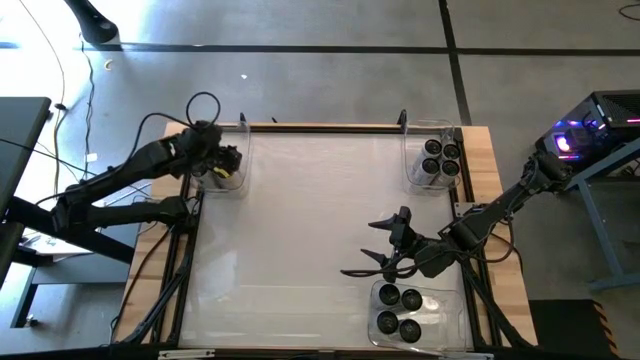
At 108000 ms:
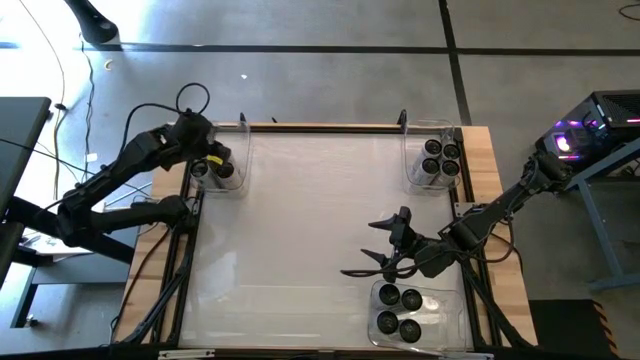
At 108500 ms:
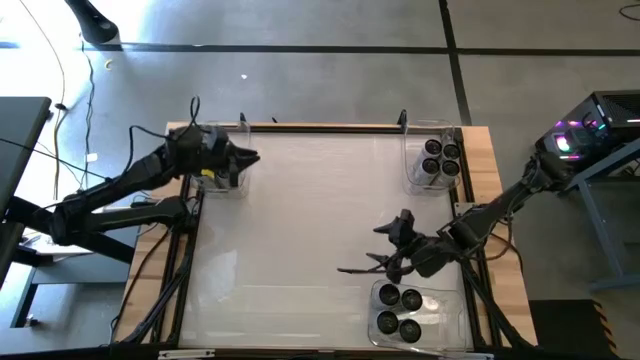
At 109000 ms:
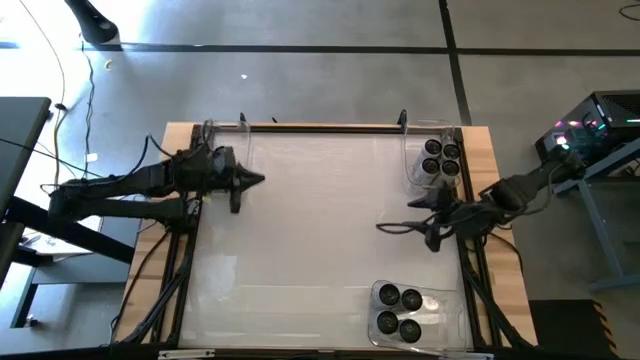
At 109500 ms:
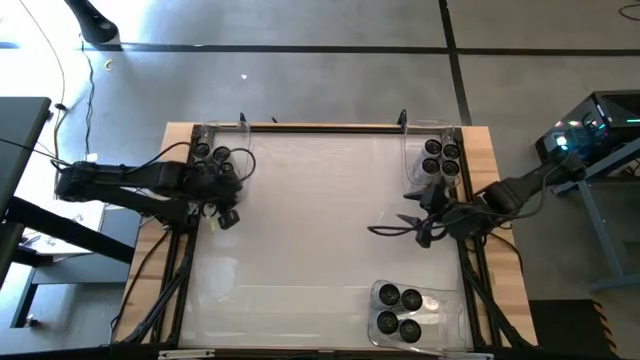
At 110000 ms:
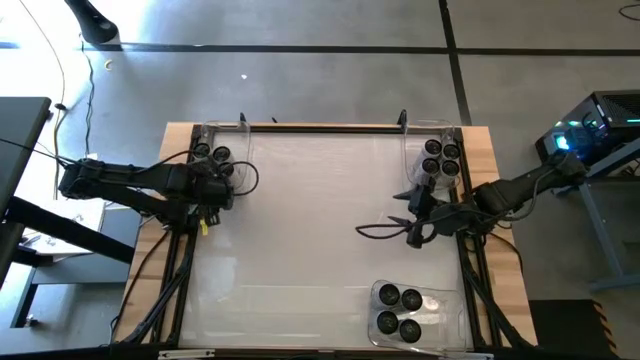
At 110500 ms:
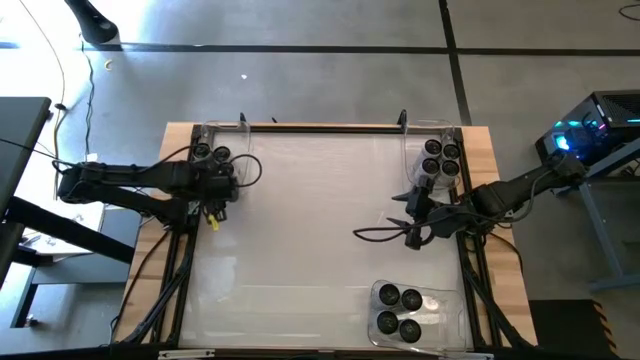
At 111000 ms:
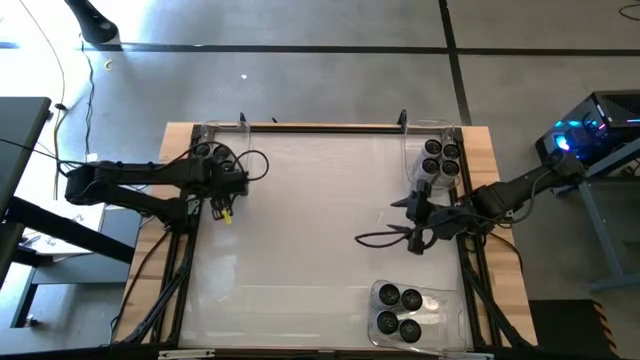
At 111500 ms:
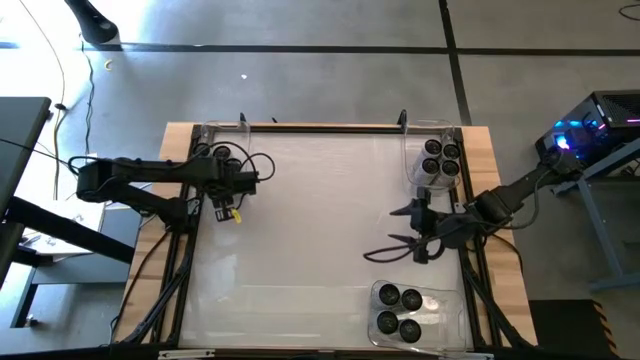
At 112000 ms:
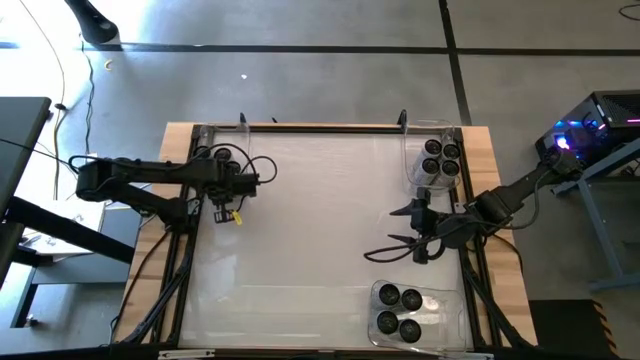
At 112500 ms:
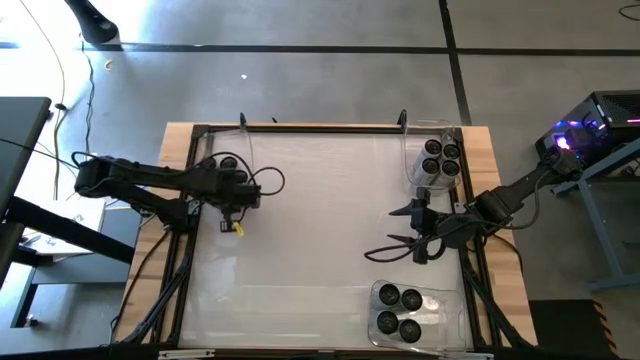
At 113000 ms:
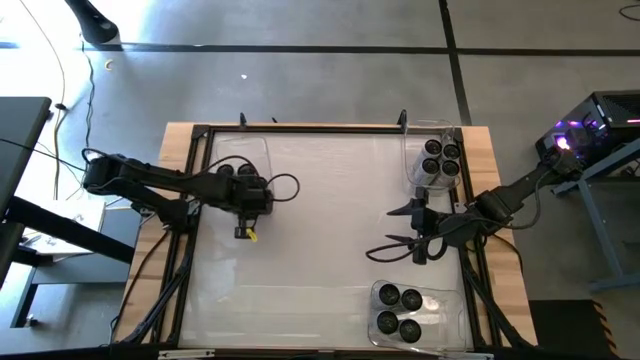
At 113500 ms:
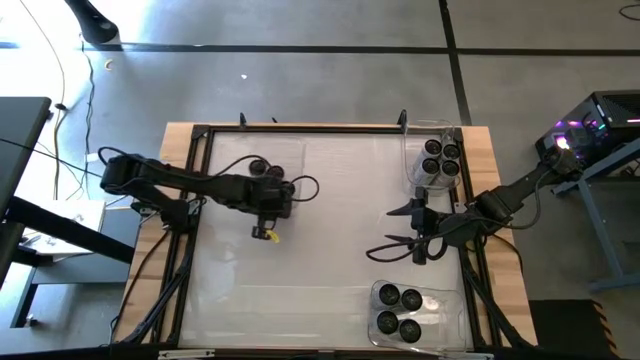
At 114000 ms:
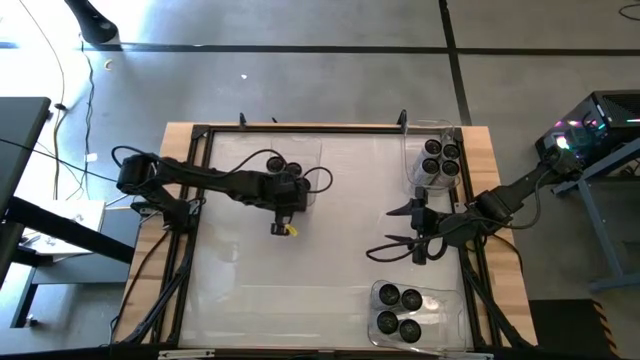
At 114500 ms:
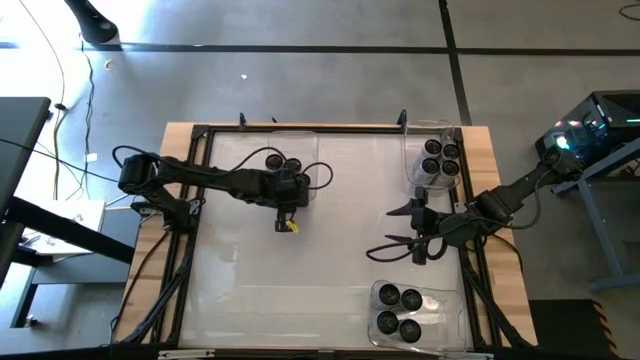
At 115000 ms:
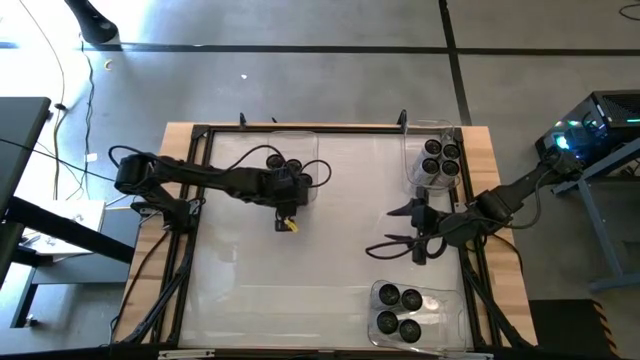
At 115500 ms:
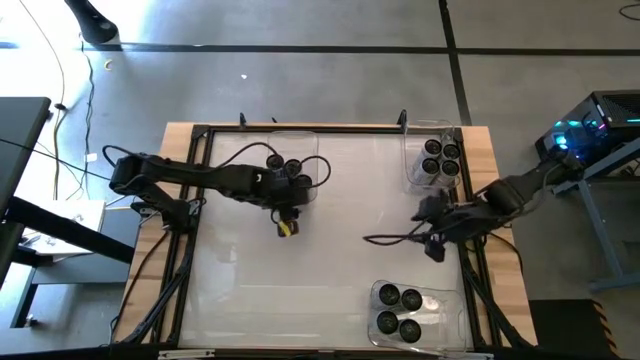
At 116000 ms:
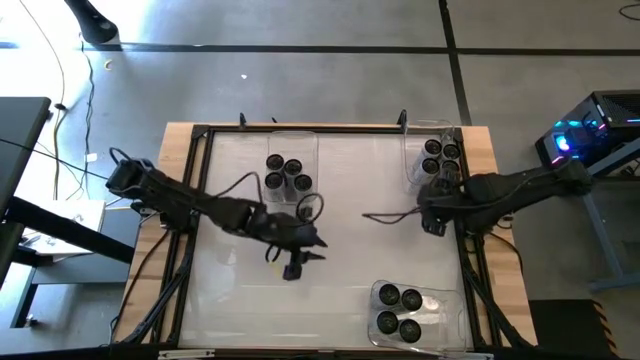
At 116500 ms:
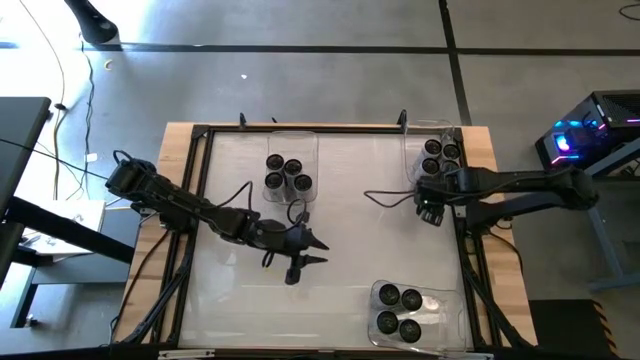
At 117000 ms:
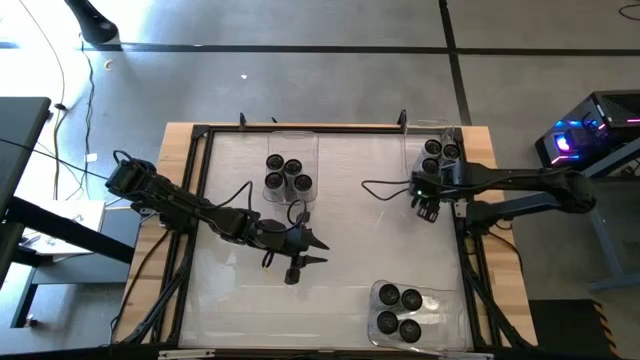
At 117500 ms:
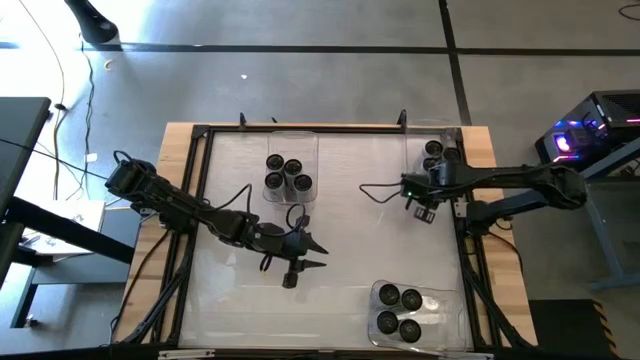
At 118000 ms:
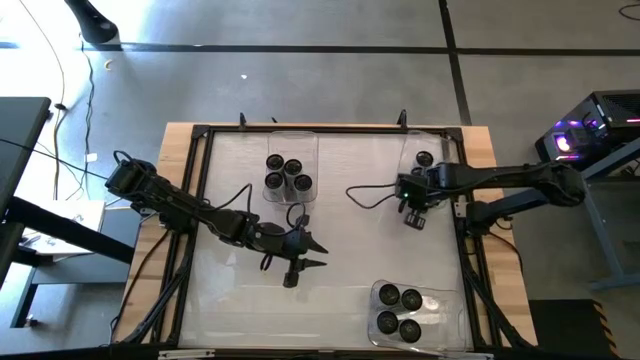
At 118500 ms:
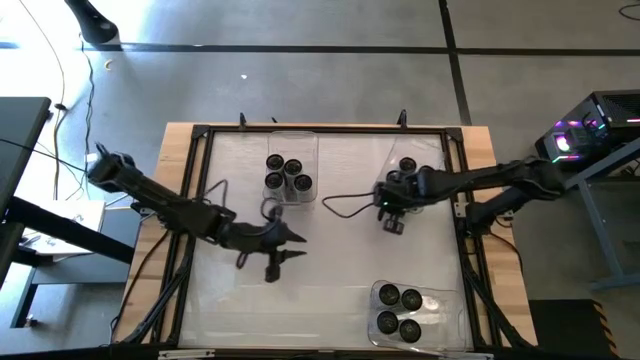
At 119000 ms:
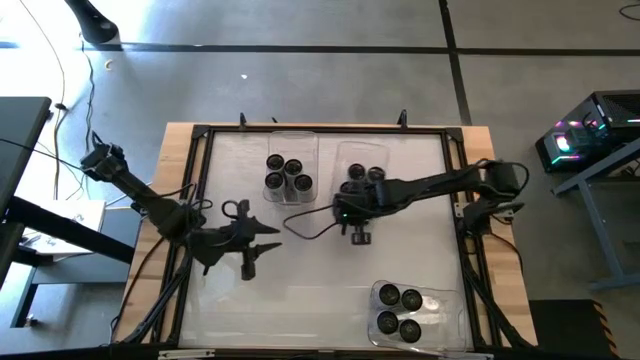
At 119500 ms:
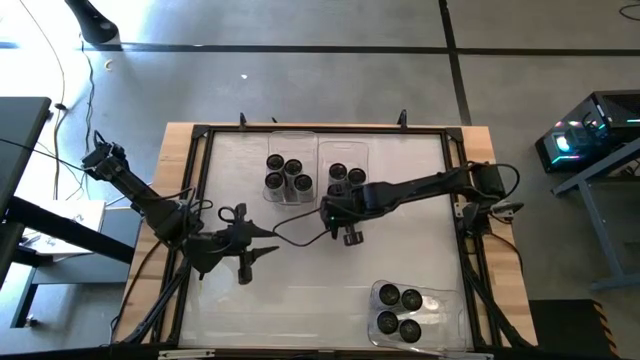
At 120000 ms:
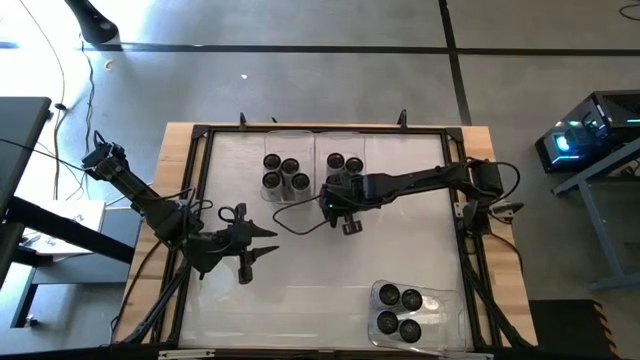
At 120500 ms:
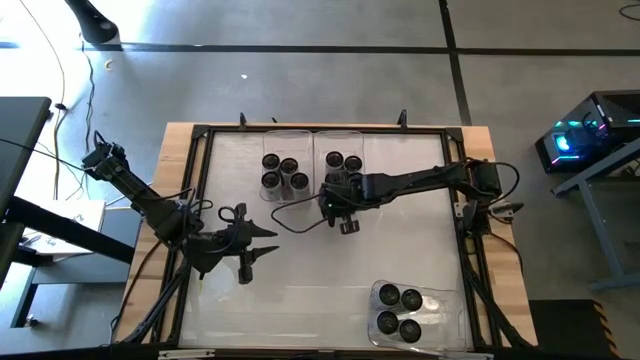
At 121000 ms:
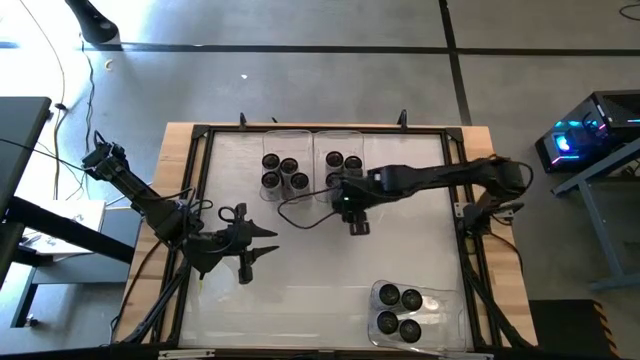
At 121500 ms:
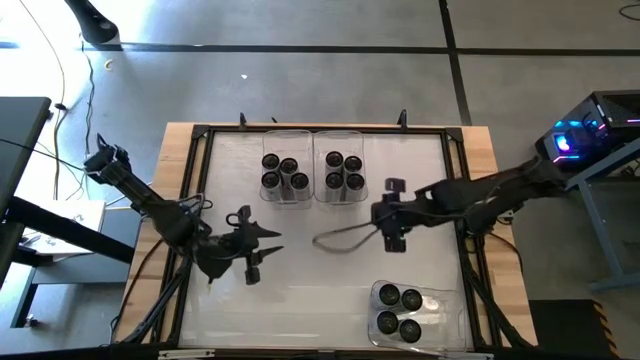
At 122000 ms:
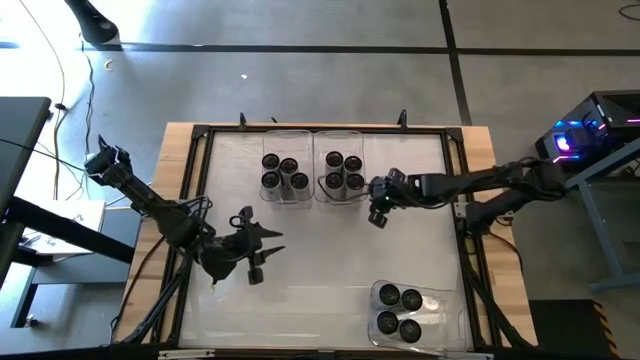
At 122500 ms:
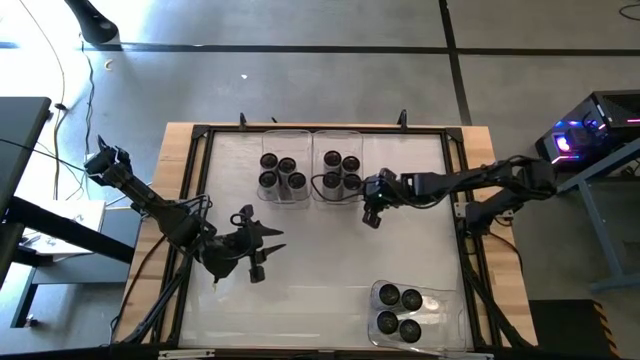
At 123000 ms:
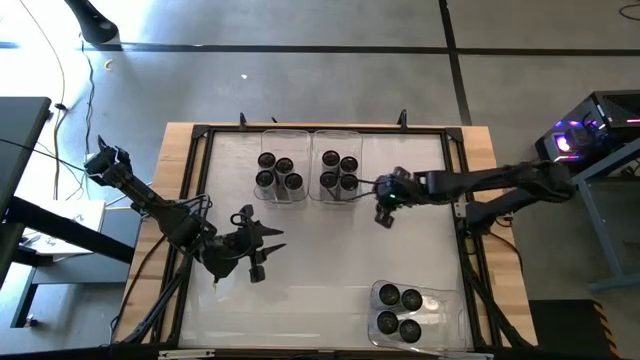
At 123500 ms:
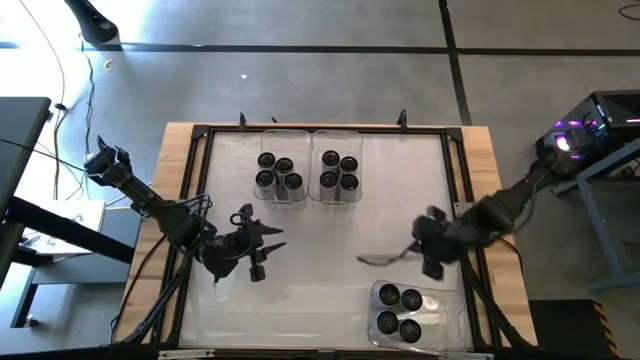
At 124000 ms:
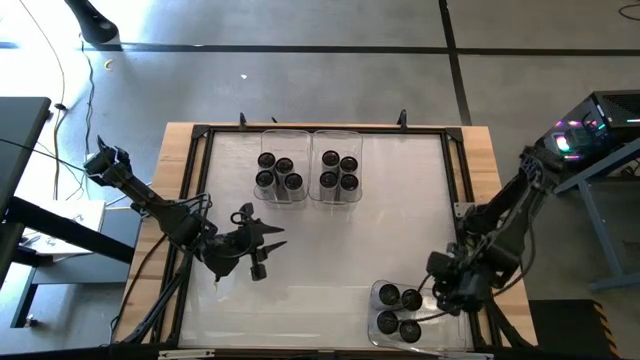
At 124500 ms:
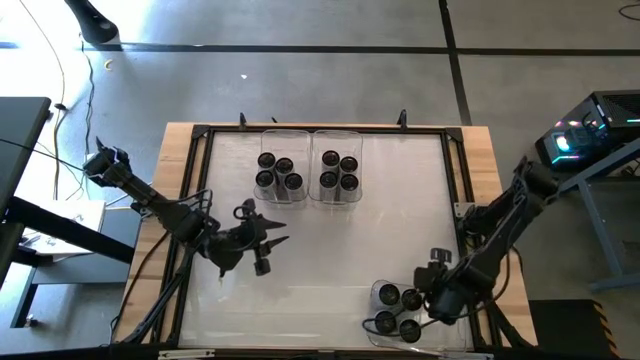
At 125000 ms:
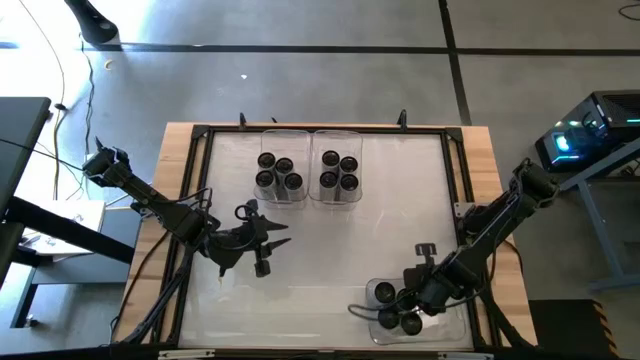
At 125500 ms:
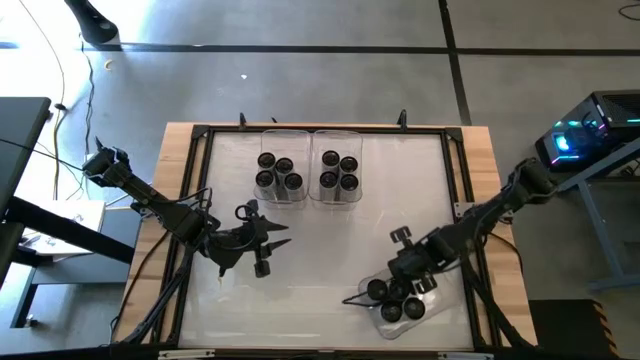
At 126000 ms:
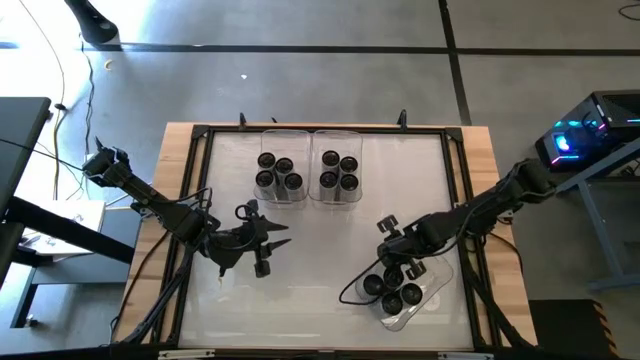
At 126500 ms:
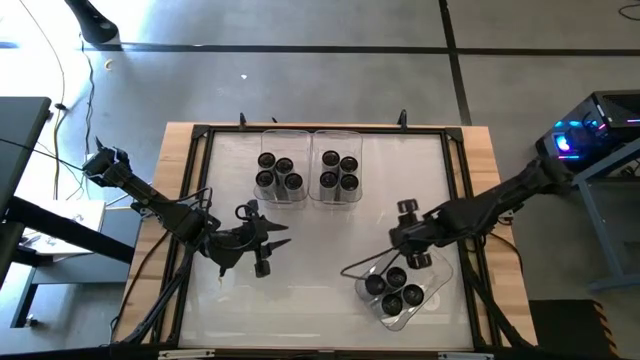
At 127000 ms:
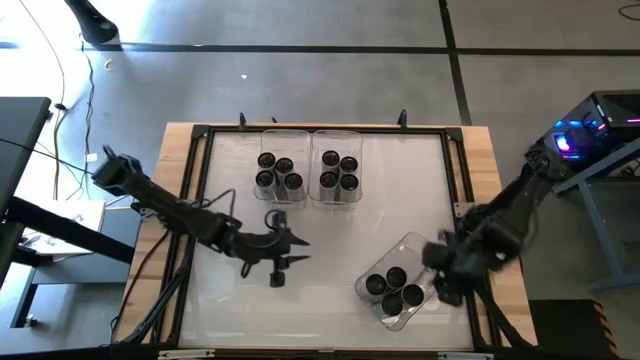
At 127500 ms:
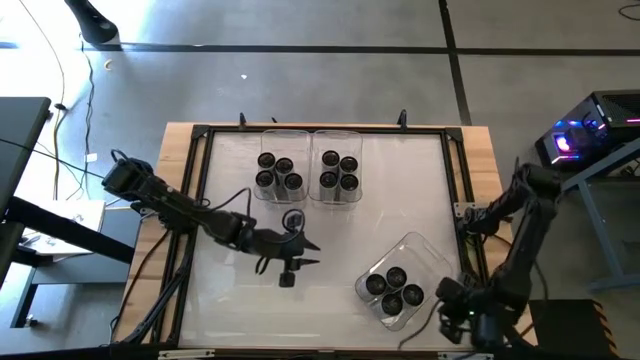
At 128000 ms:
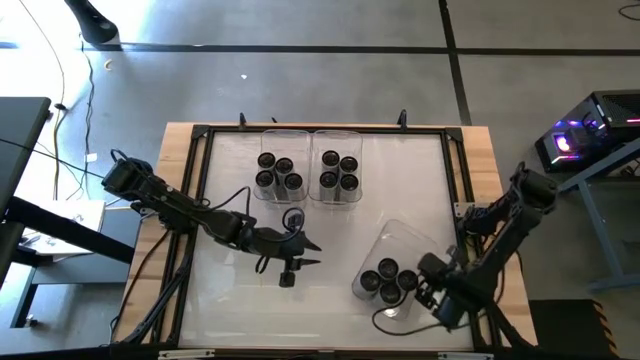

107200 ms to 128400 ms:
Task: Sort soda cans
Move the transparent bins to the top center of the table
